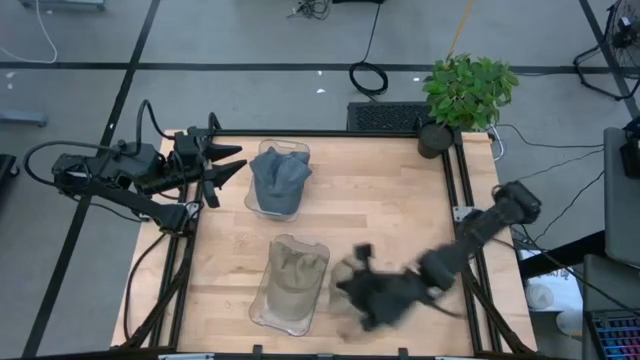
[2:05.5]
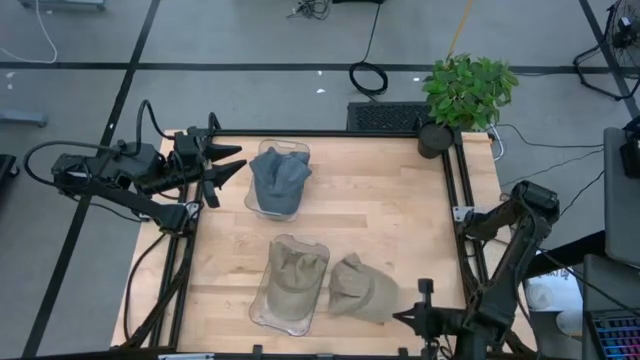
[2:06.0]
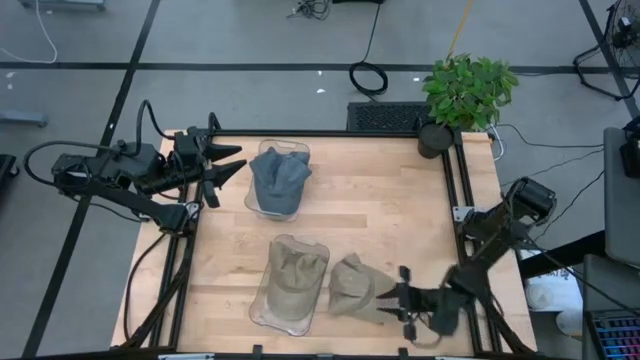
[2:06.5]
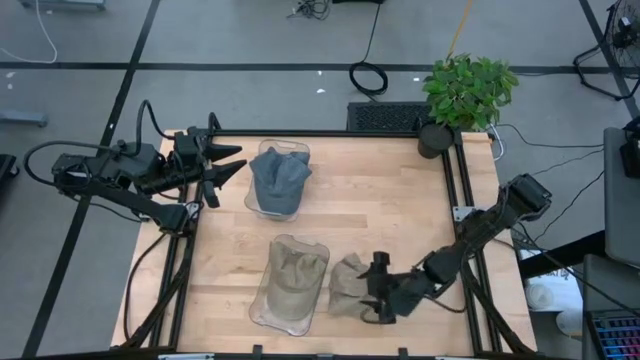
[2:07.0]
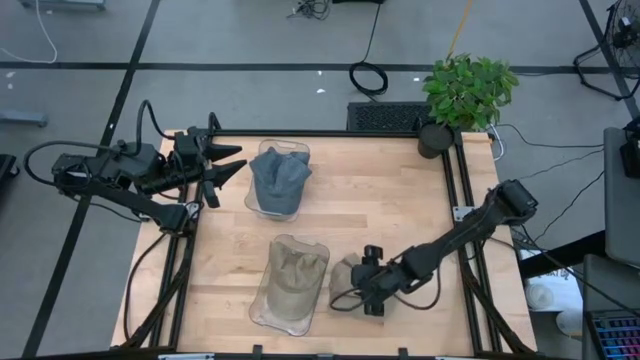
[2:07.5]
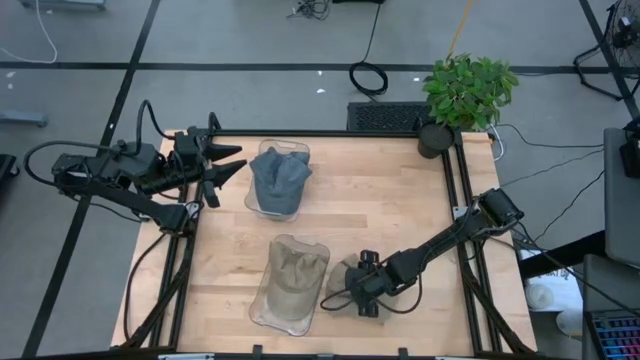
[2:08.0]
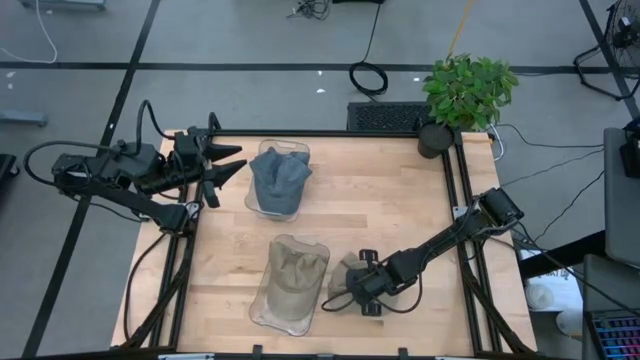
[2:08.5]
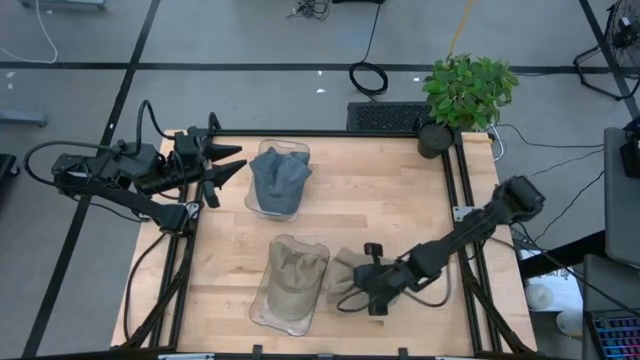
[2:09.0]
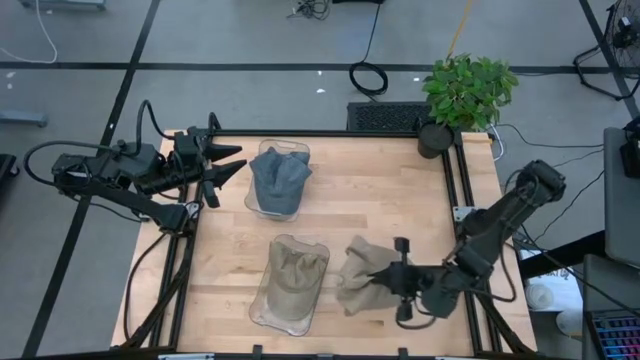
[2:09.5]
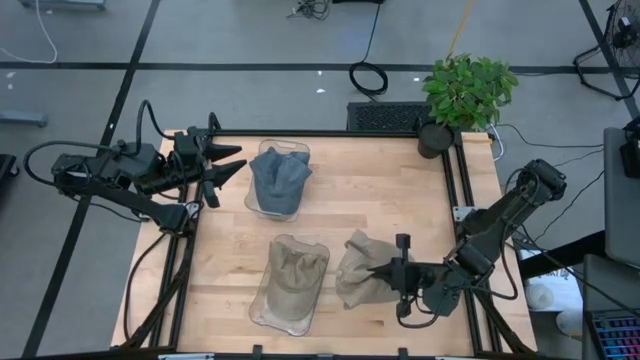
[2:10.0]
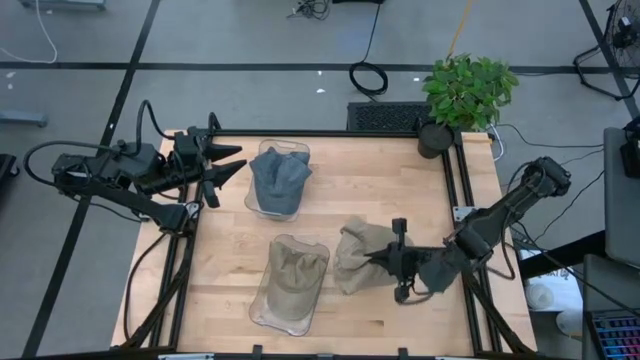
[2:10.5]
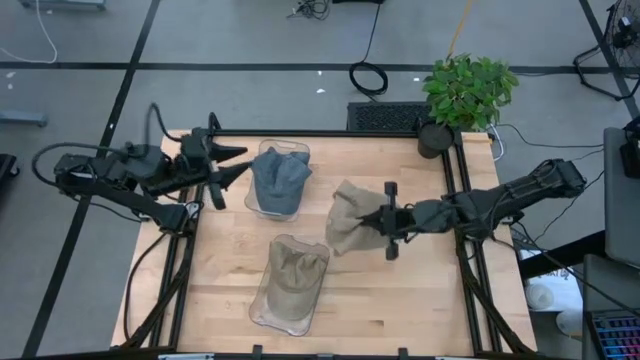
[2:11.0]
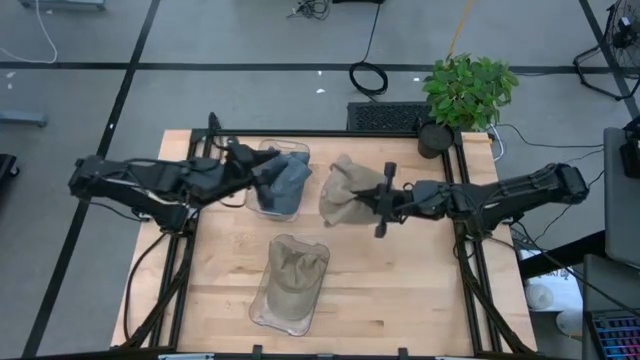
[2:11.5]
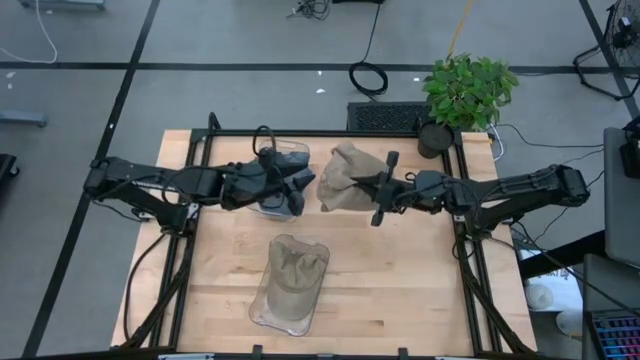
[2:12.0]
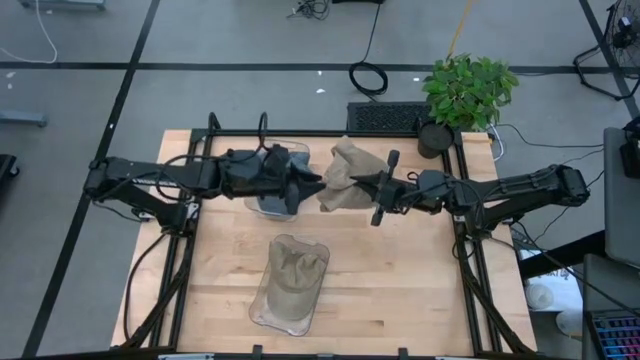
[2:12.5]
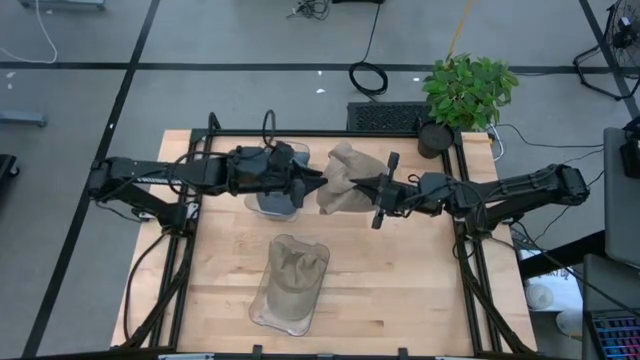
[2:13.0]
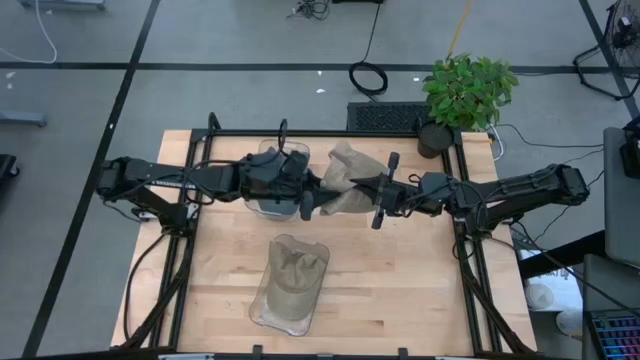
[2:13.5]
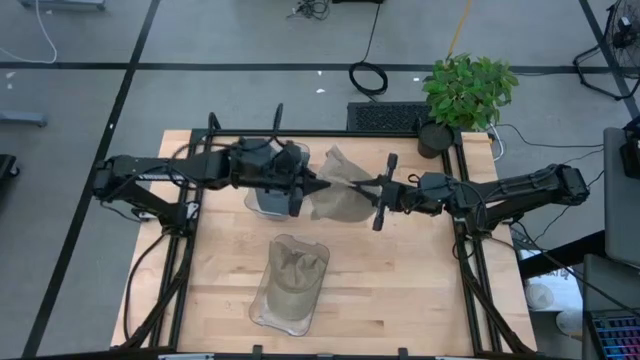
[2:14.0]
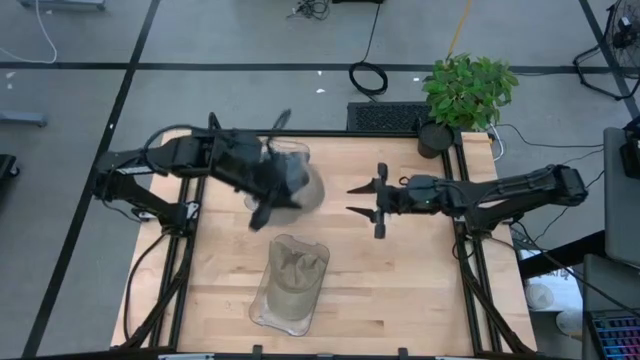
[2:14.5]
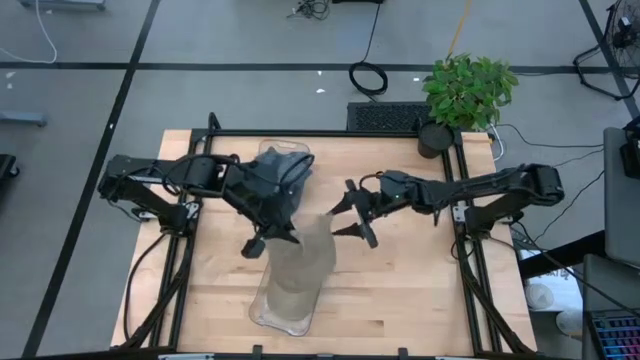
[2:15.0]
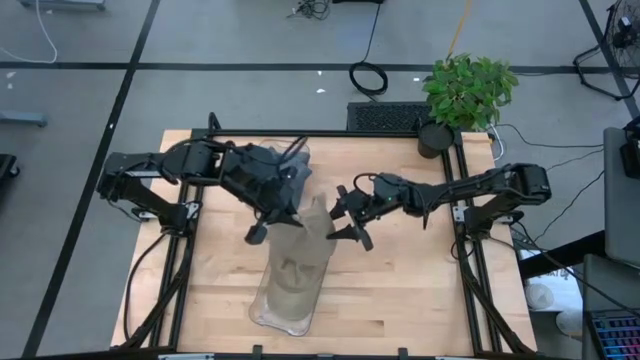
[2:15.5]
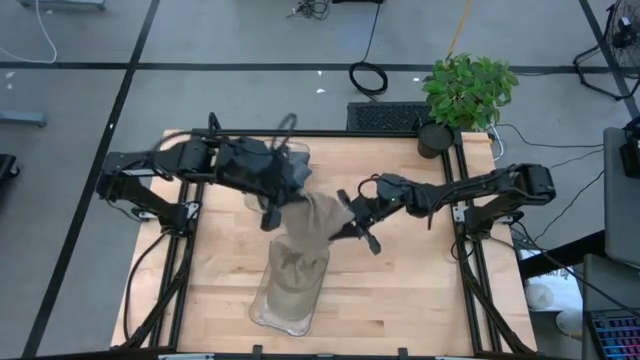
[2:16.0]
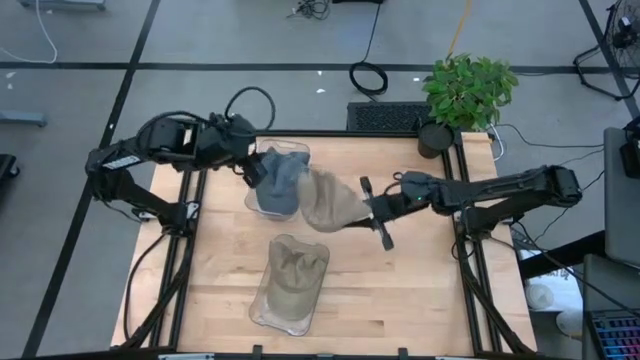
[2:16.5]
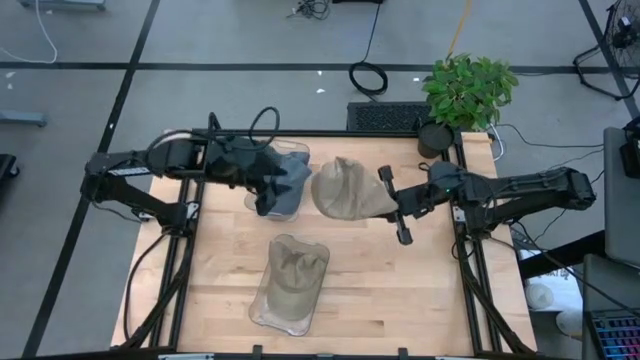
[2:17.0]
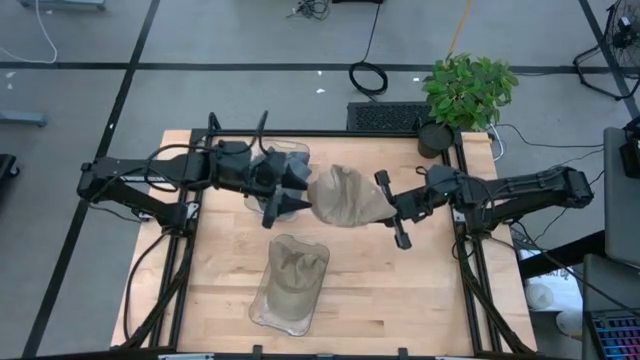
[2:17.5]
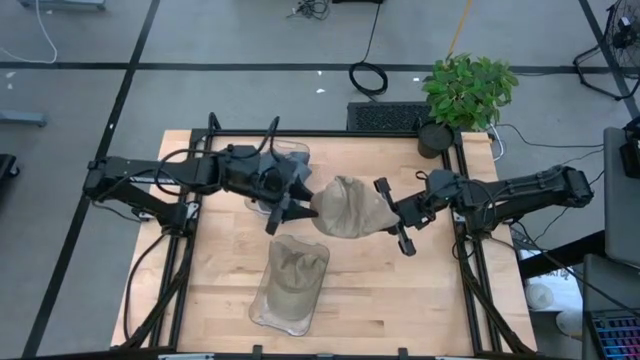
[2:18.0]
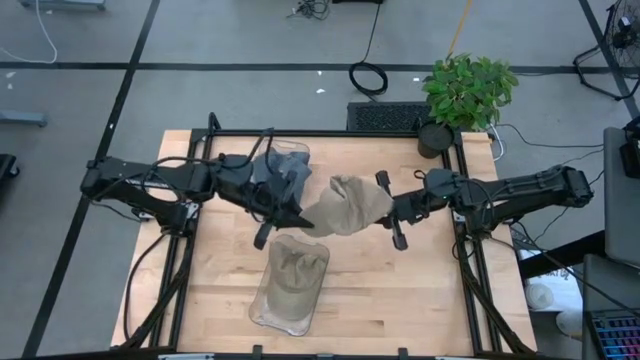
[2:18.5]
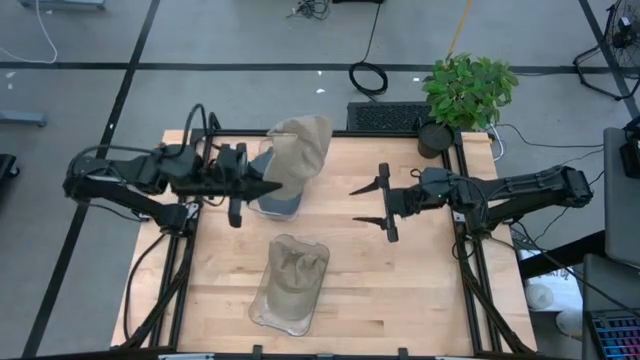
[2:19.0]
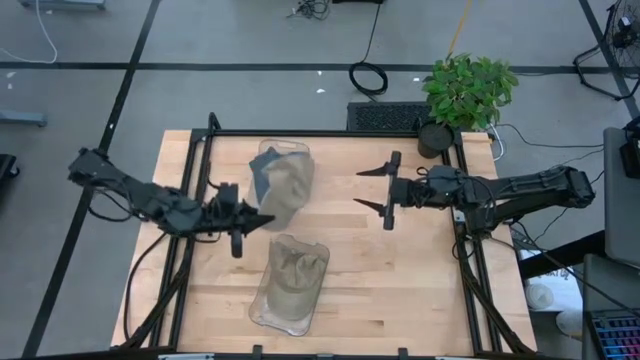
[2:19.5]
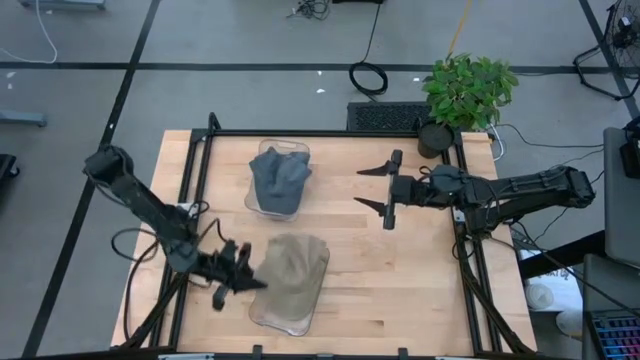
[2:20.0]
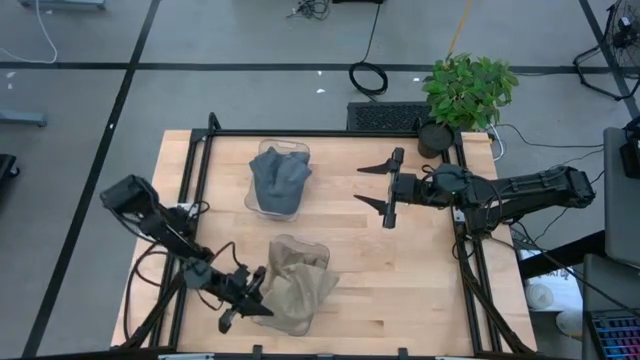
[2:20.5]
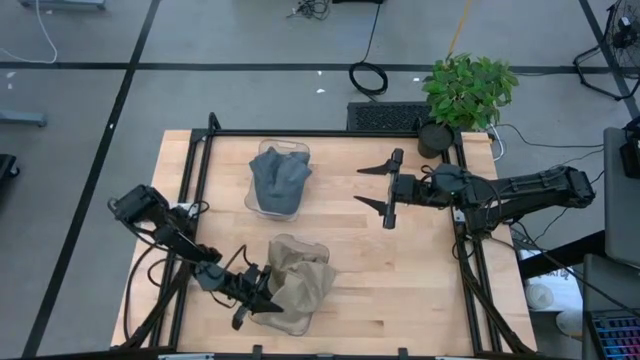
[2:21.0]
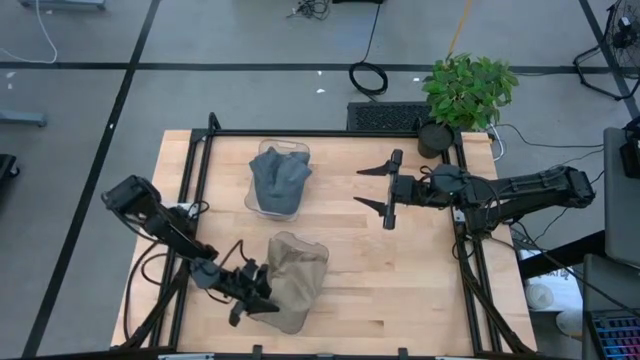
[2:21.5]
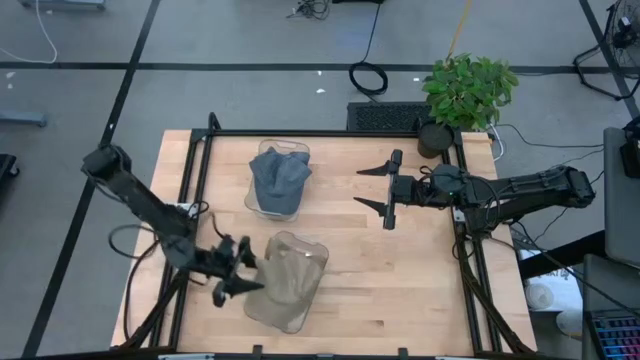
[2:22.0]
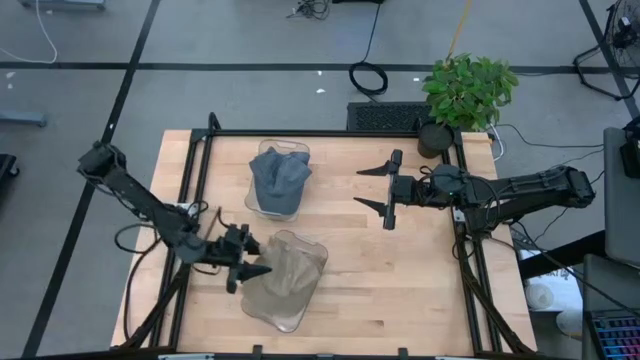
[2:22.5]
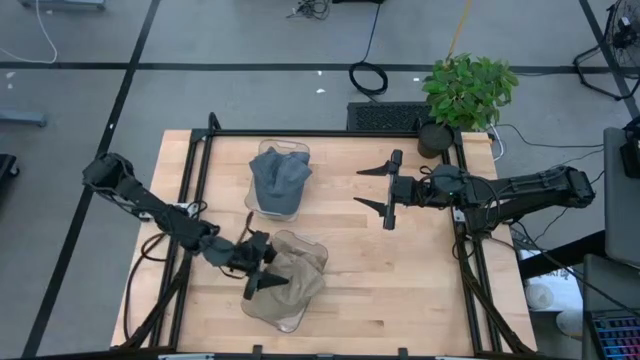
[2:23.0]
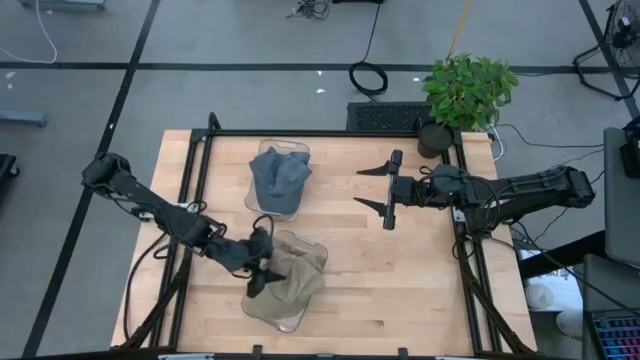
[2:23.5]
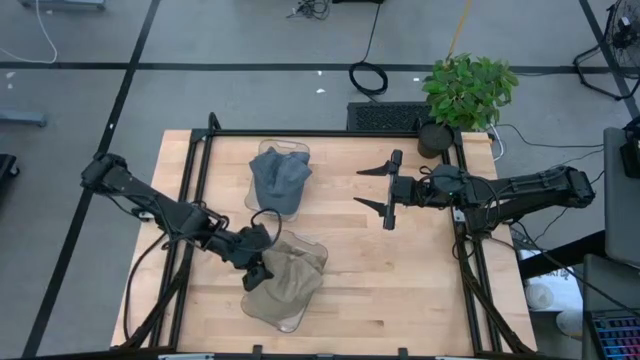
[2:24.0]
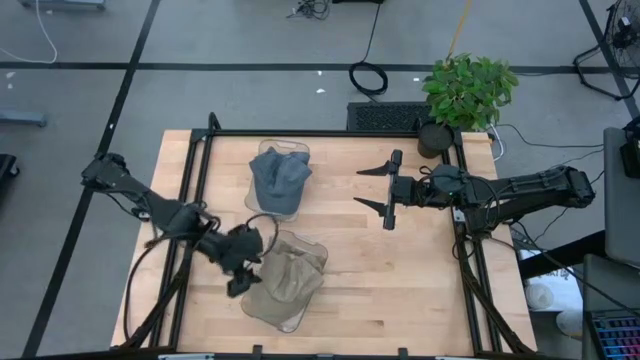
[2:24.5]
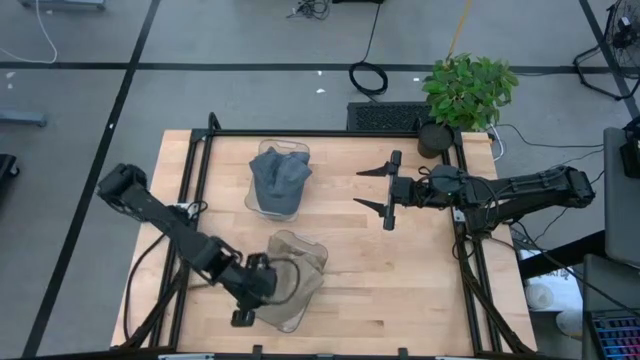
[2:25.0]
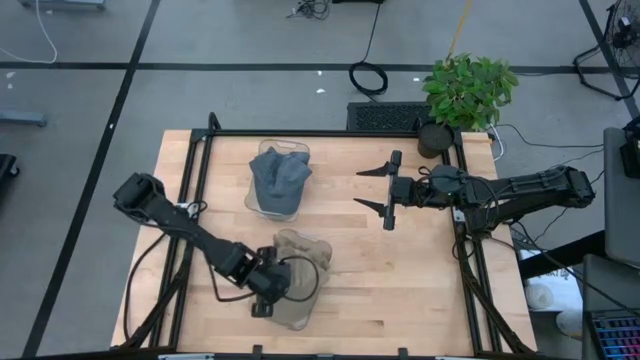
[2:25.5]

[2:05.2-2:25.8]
Task: Stack caps by color
Stack the brown cap on the stacked brown caps in the bottom transparent bin

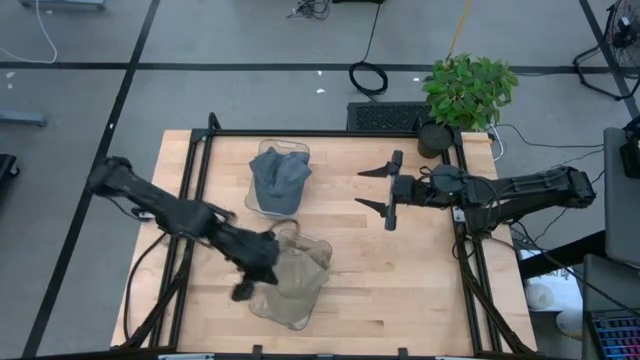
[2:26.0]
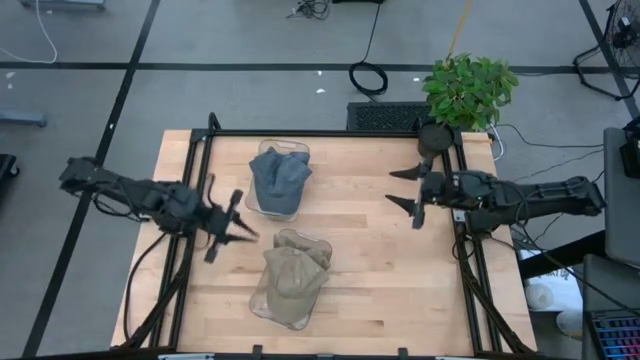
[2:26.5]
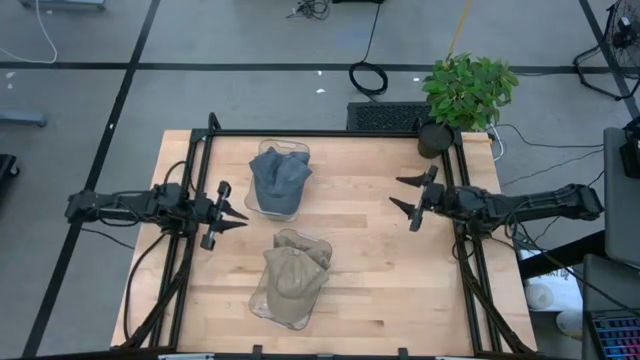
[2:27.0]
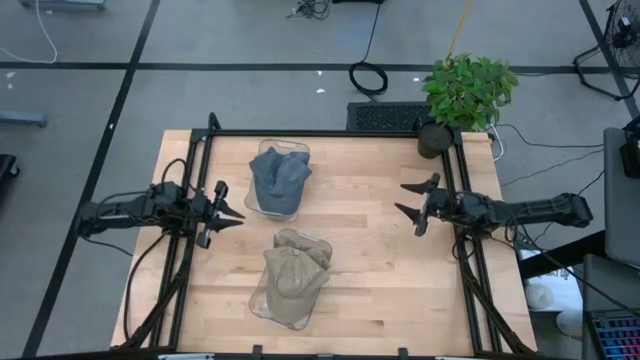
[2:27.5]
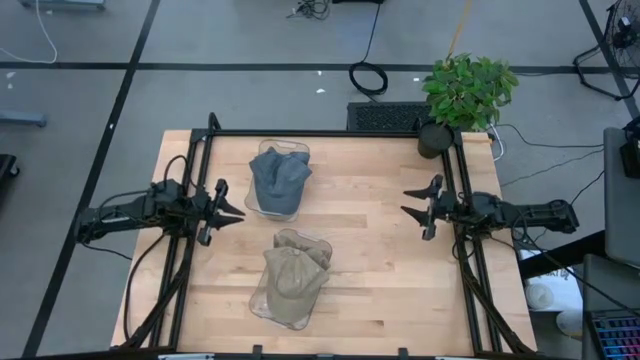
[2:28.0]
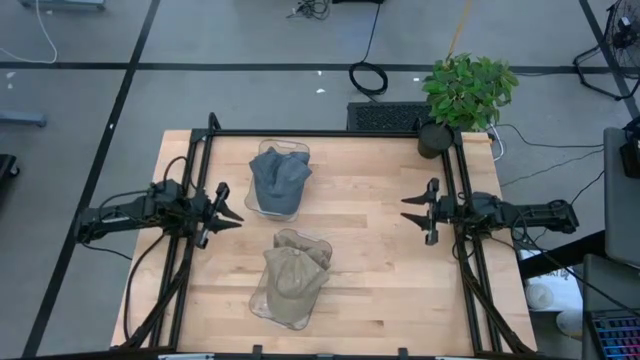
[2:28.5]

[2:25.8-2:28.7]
Return to Home Position
